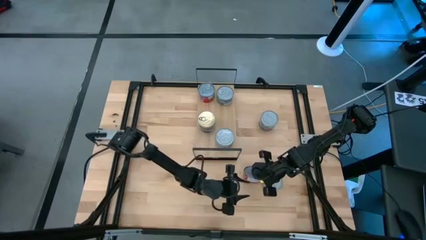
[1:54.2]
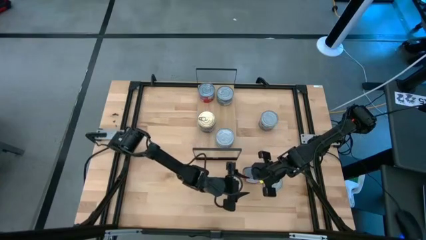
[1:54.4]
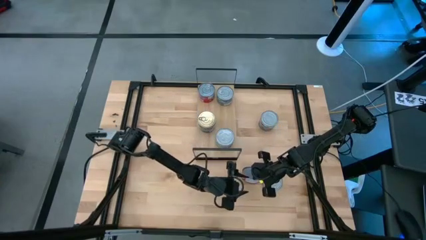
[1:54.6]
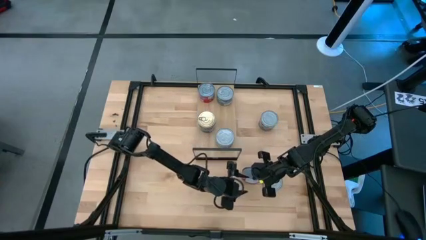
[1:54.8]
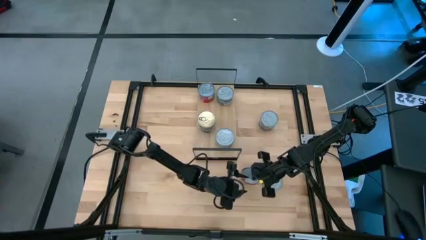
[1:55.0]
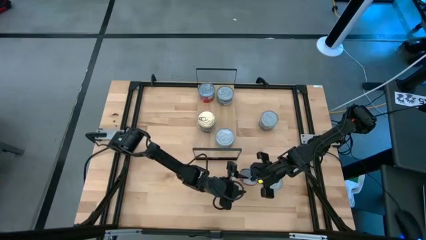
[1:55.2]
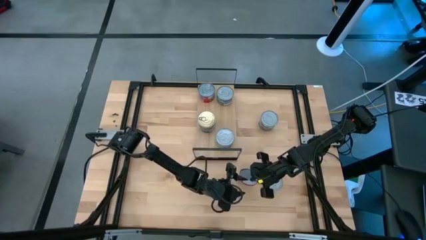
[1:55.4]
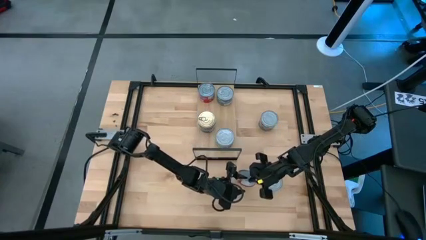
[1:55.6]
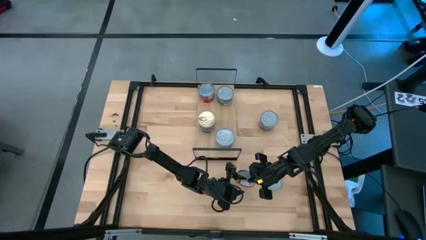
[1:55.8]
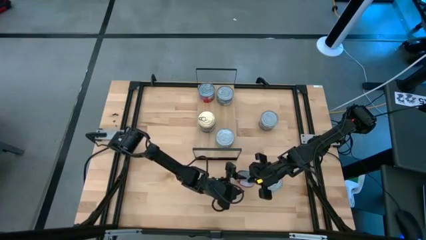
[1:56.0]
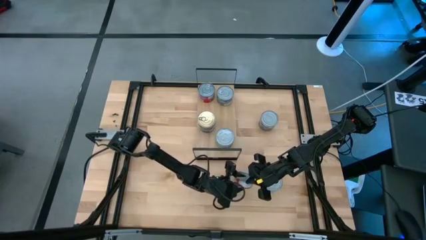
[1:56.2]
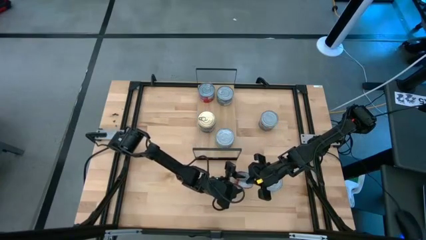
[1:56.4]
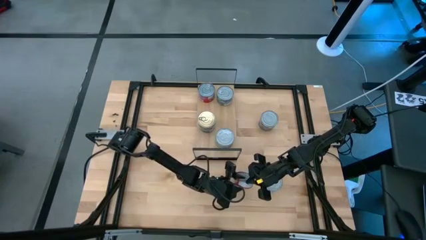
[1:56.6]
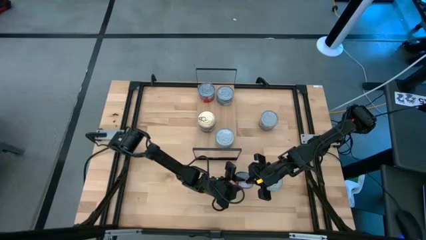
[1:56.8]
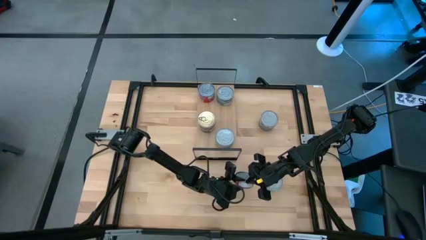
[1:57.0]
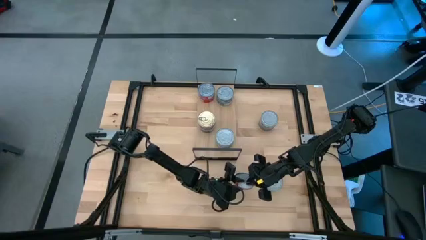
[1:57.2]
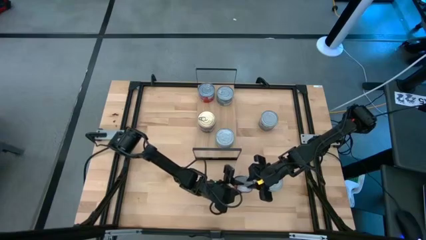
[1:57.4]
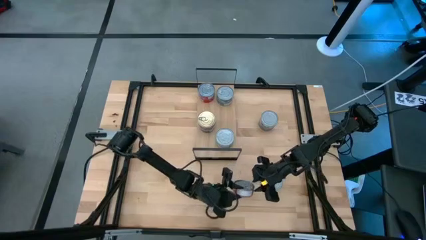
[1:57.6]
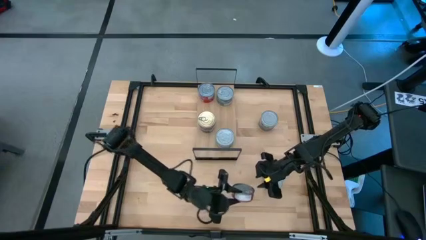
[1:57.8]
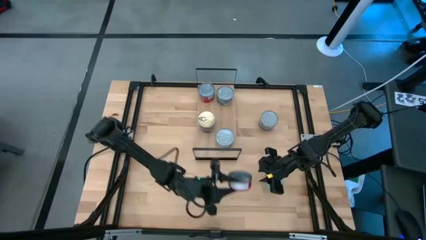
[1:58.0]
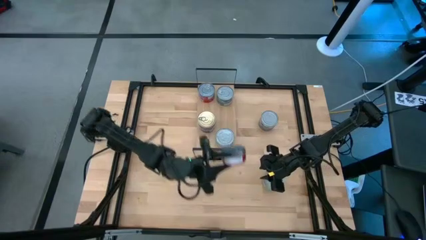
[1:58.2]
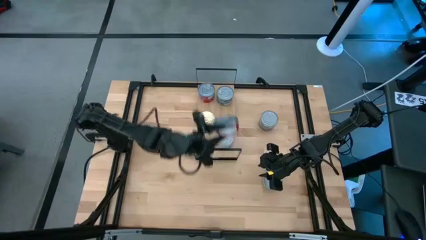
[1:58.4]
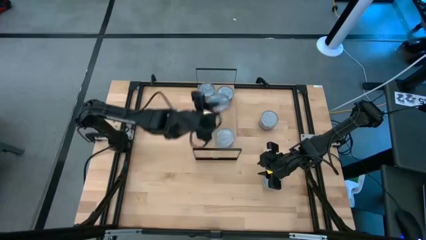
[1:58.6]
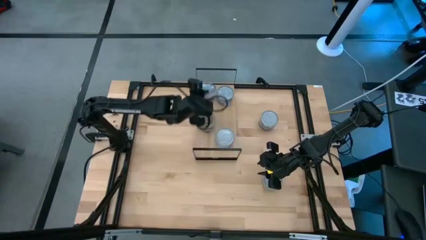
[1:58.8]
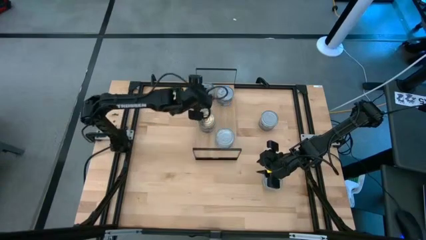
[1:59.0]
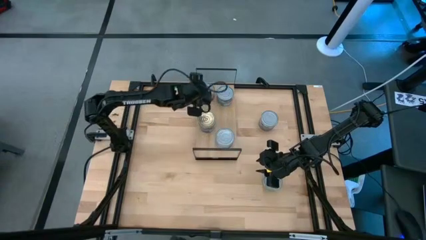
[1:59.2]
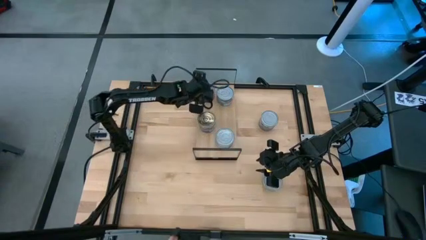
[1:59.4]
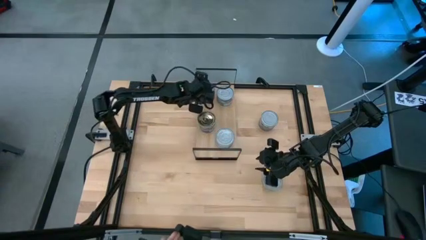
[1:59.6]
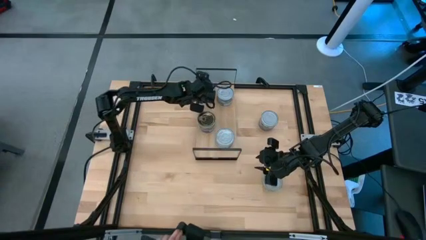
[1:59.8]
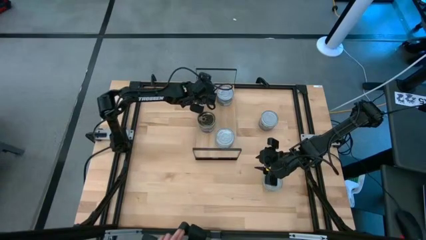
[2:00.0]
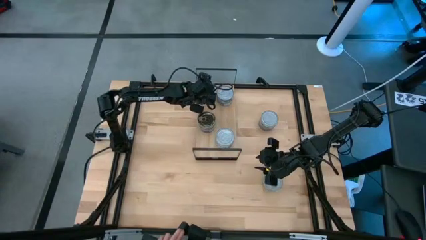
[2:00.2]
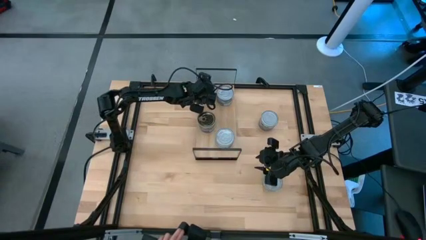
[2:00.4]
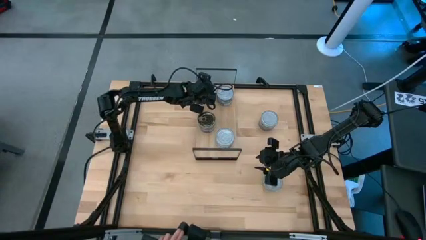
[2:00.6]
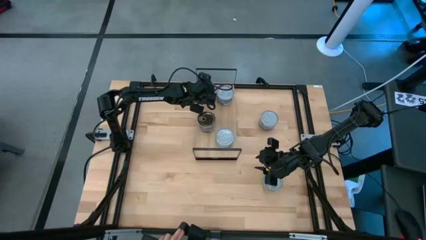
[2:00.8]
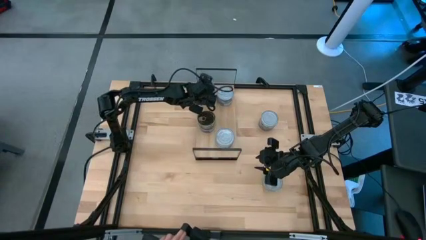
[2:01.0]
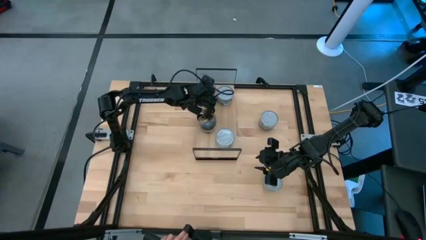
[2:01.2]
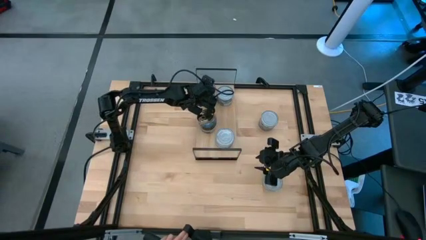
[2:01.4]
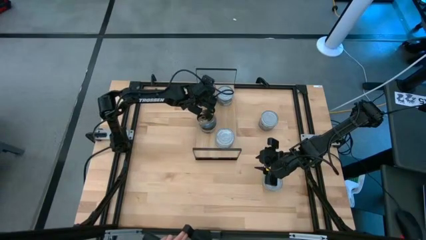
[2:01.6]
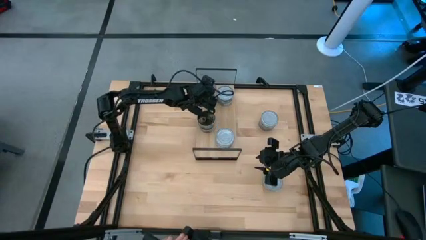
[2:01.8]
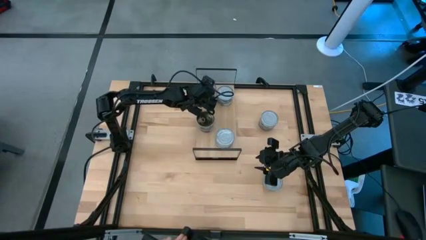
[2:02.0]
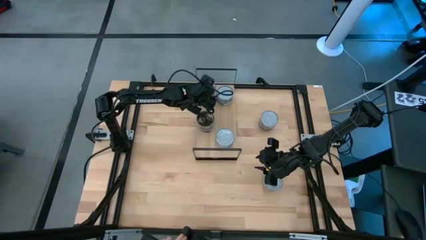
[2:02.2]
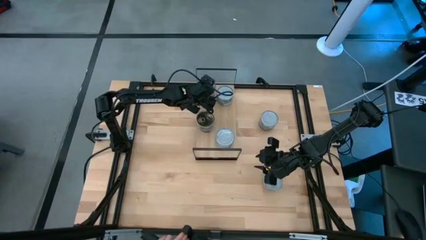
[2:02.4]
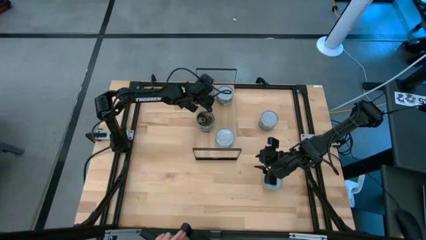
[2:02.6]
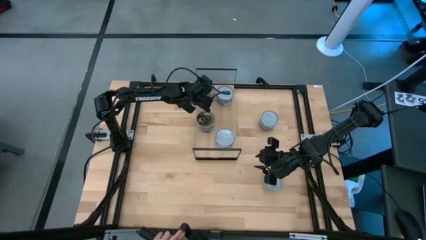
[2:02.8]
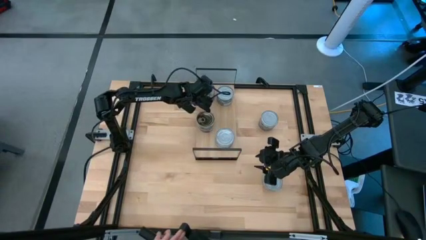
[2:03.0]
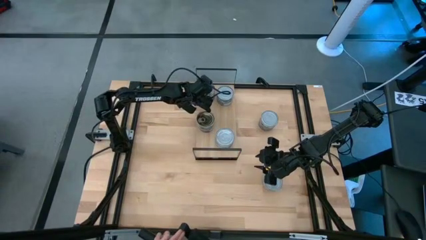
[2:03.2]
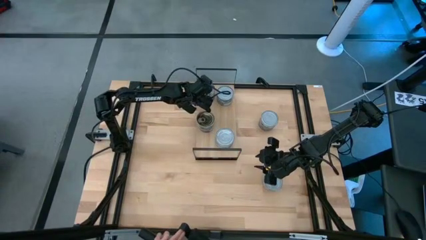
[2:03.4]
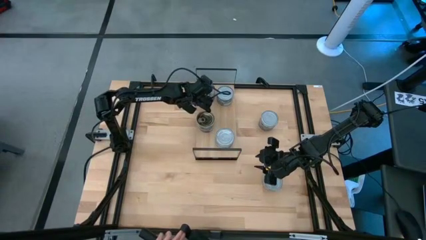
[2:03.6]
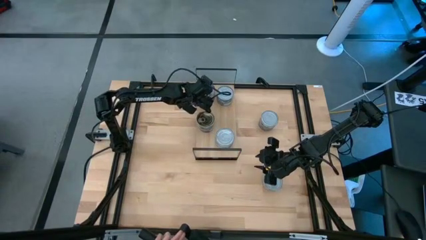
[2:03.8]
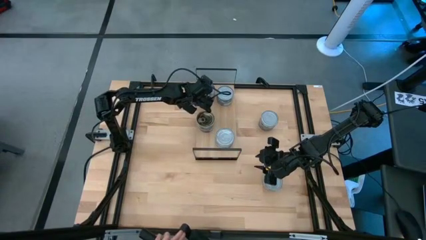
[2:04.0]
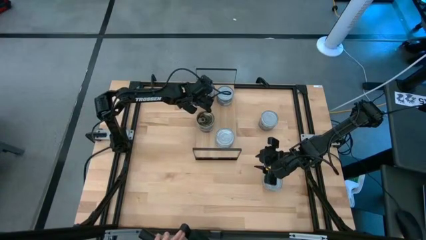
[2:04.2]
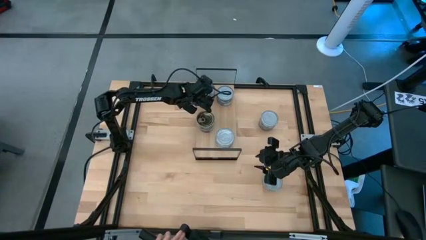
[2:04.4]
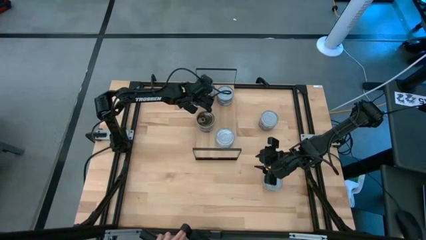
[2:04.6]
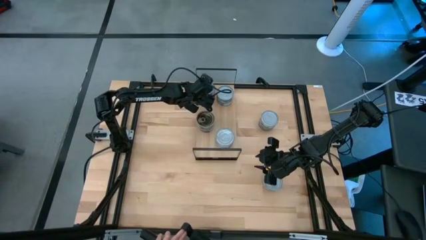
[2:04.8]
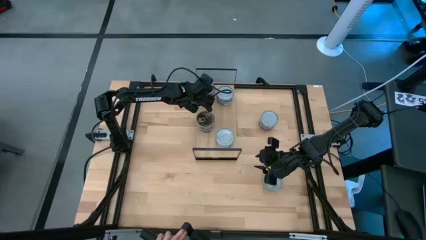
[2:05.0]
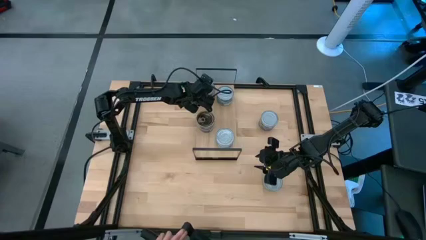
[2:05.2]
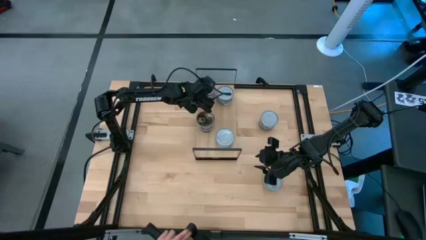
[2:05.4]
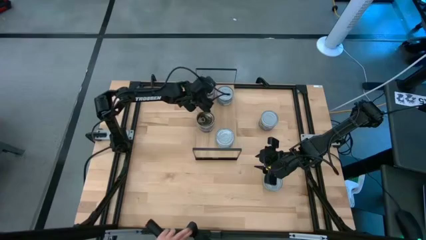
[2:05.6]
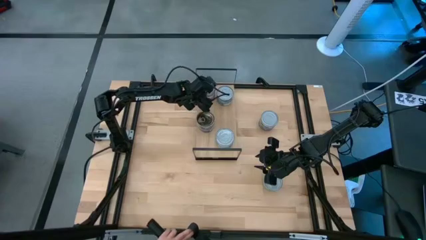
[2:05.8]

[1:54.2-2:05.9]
Task: Stack canned seafood by type on shelf
Stack the red tuna can on top of the other red tuna can on the shelf
